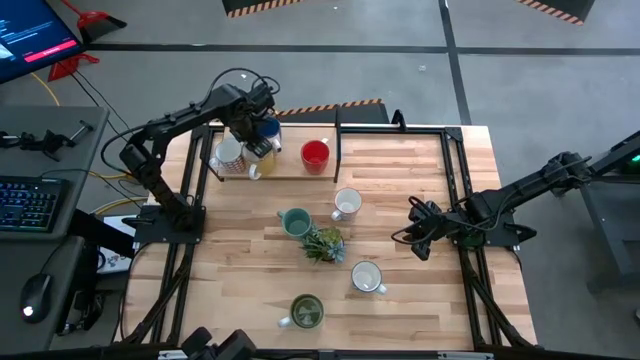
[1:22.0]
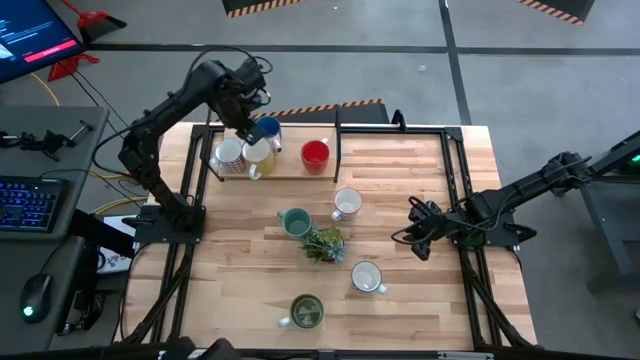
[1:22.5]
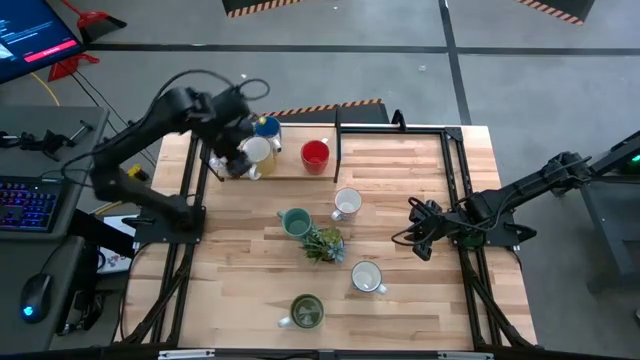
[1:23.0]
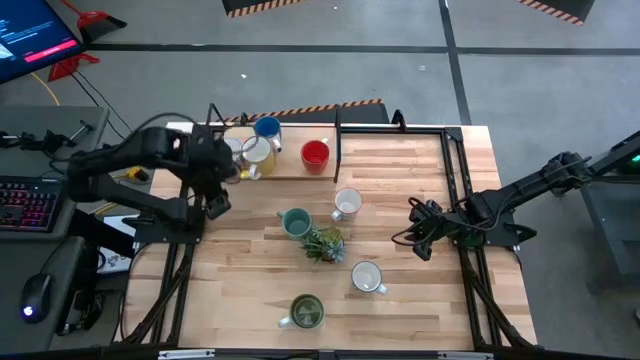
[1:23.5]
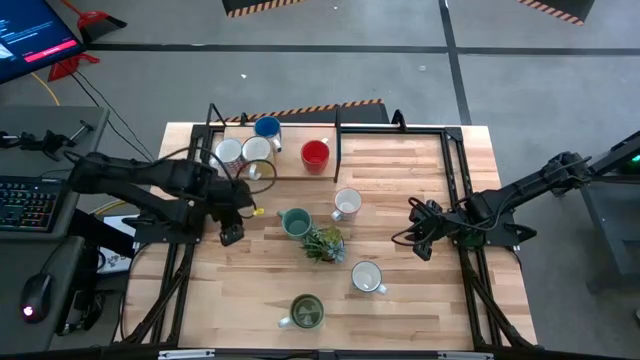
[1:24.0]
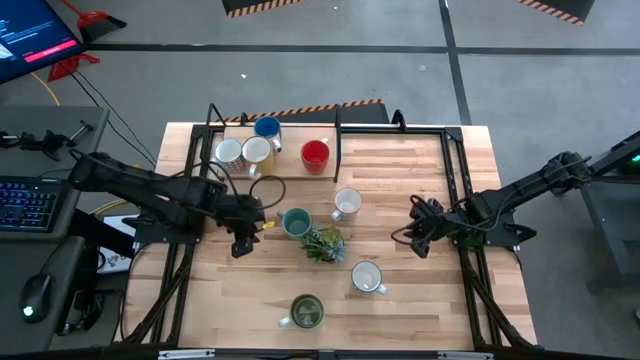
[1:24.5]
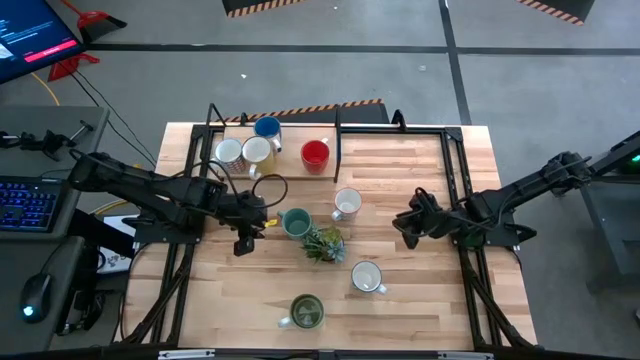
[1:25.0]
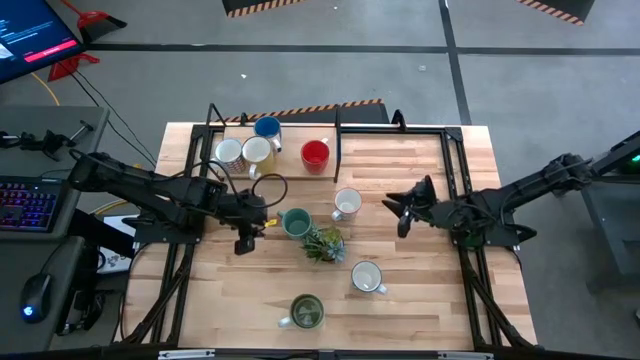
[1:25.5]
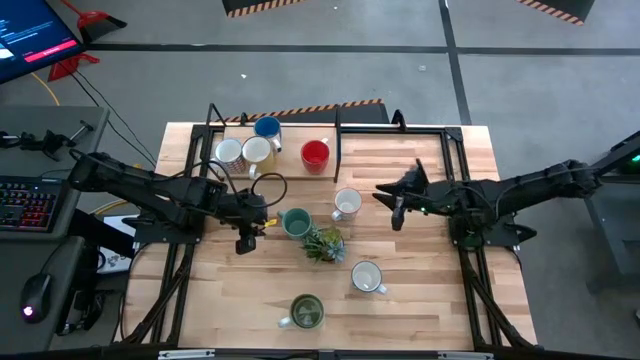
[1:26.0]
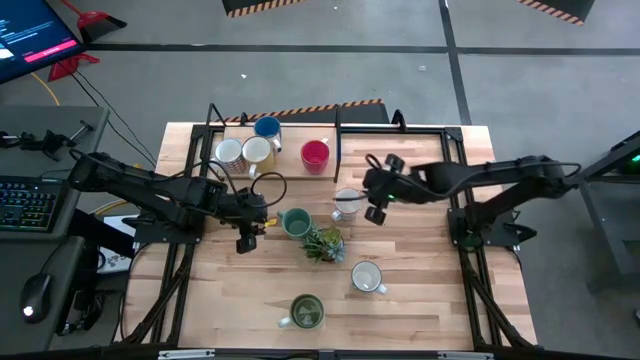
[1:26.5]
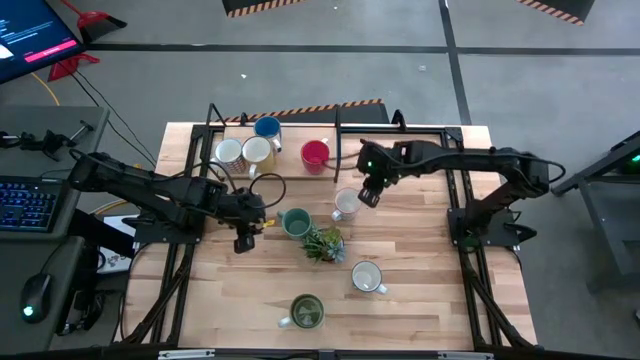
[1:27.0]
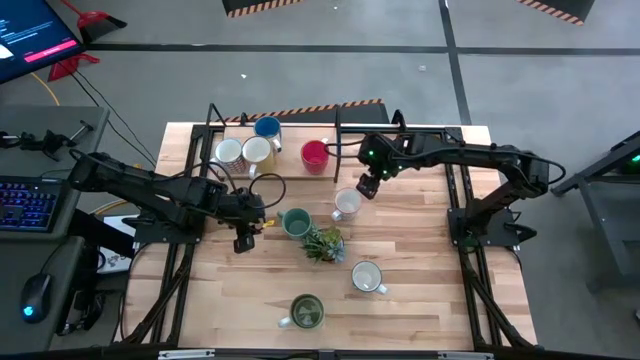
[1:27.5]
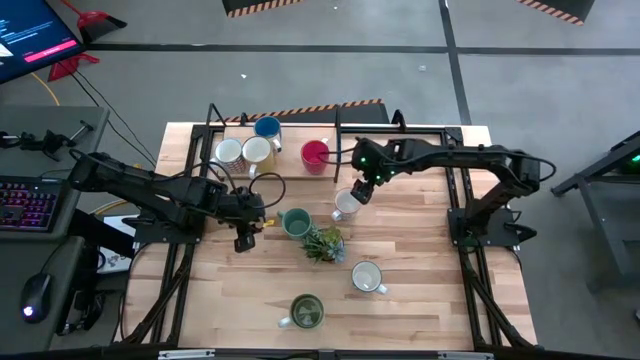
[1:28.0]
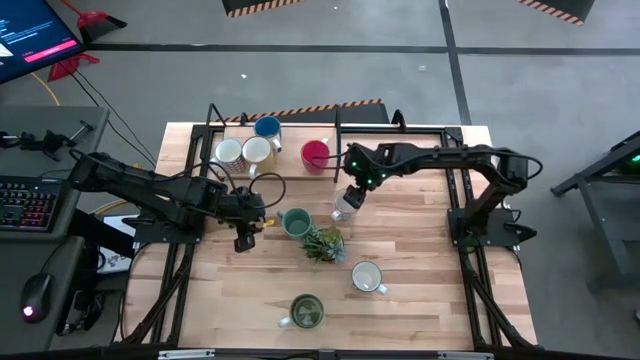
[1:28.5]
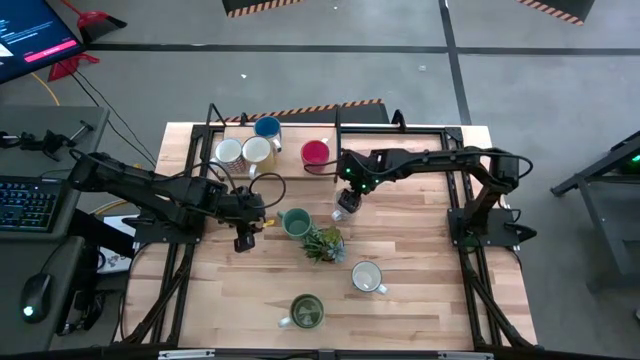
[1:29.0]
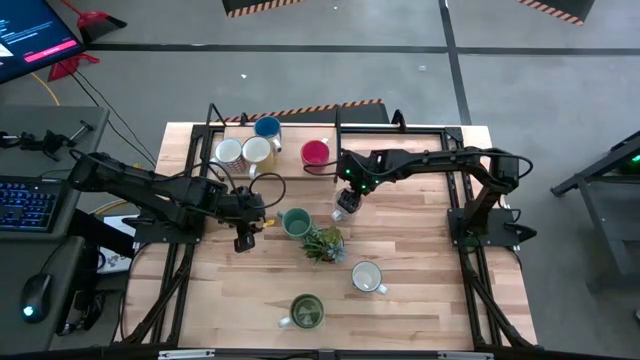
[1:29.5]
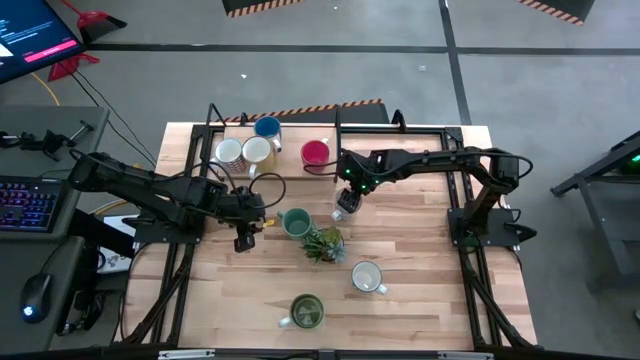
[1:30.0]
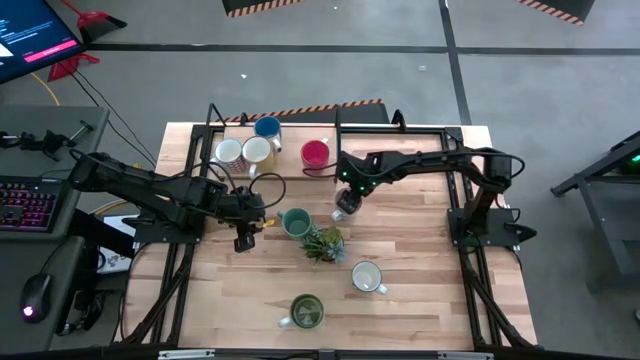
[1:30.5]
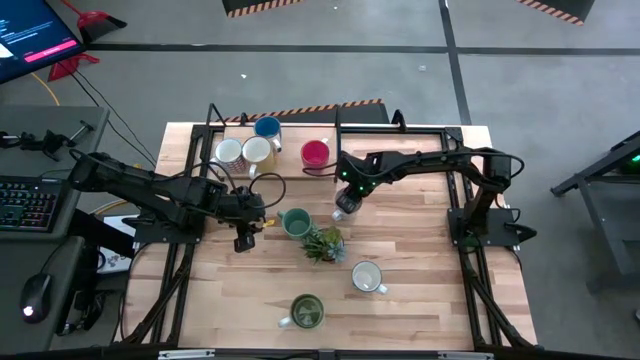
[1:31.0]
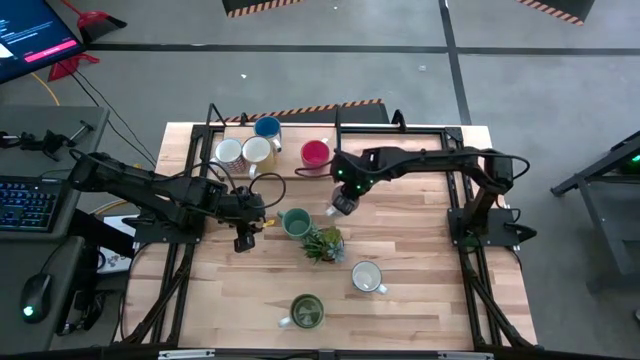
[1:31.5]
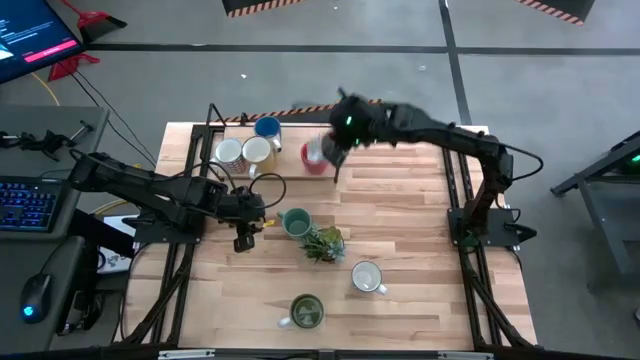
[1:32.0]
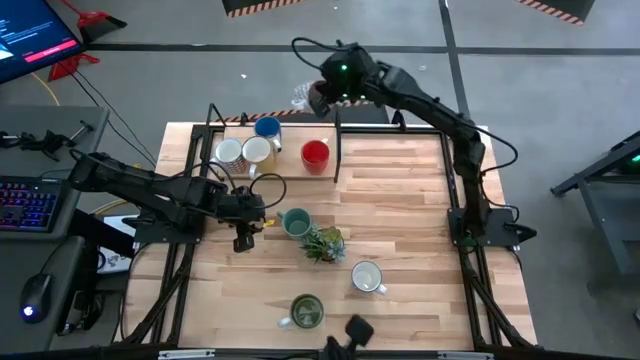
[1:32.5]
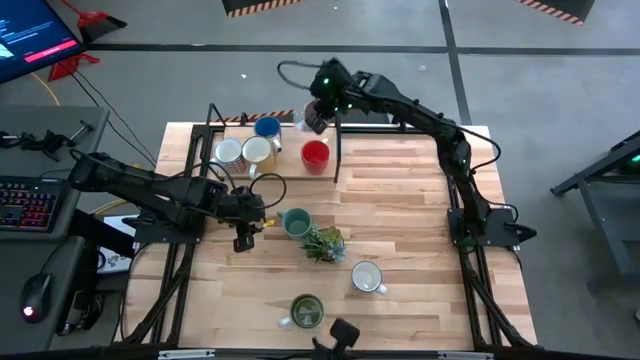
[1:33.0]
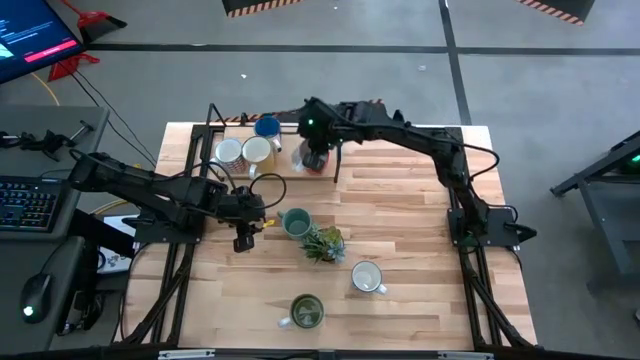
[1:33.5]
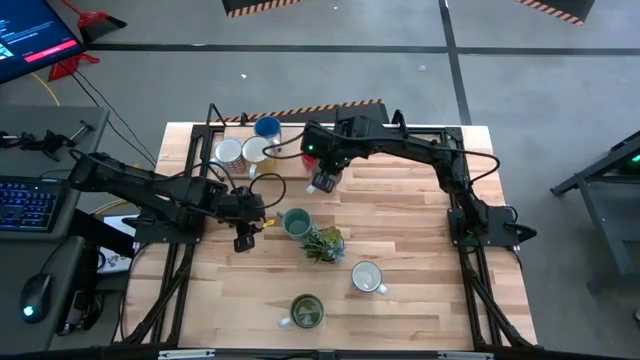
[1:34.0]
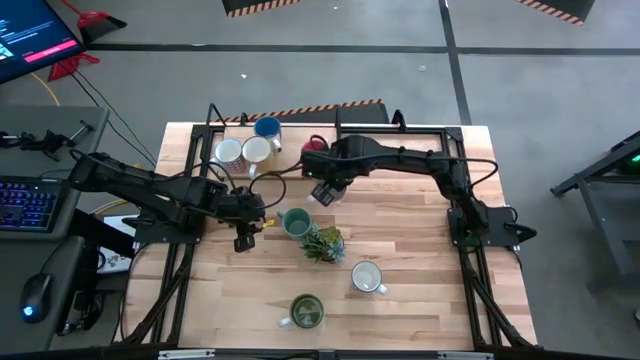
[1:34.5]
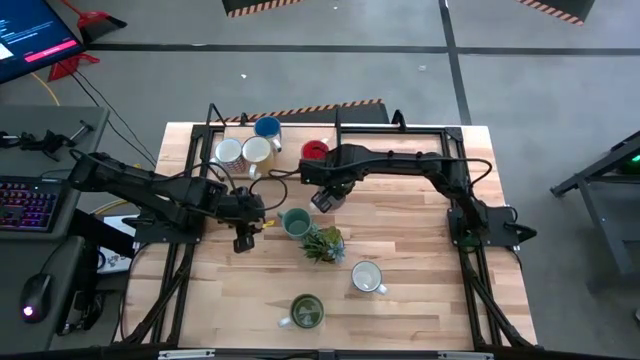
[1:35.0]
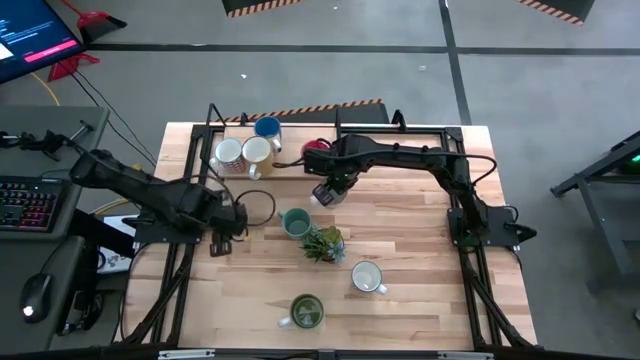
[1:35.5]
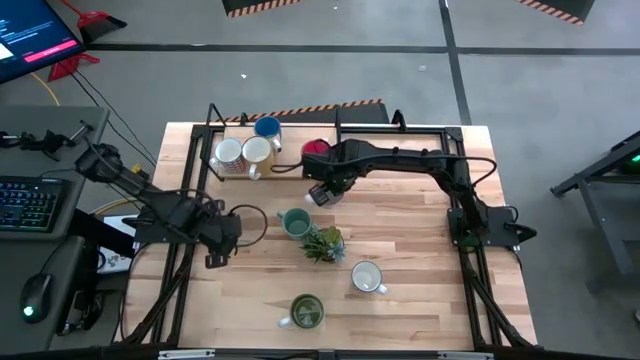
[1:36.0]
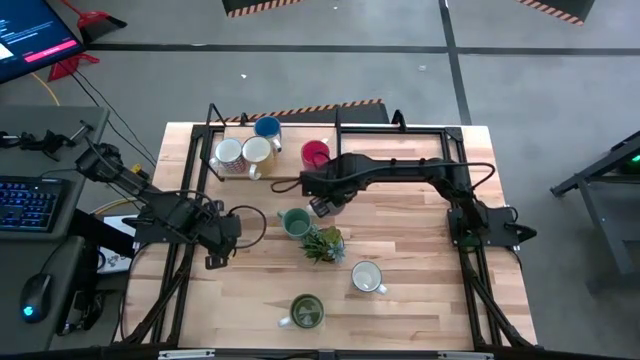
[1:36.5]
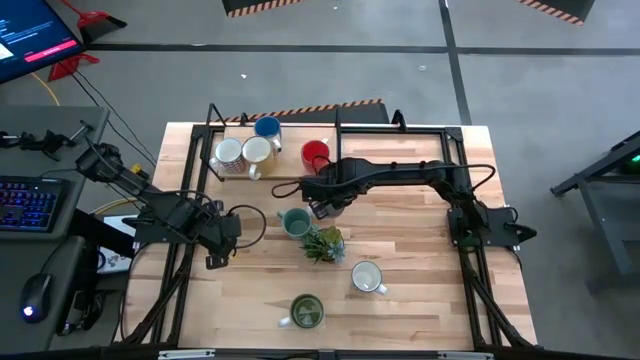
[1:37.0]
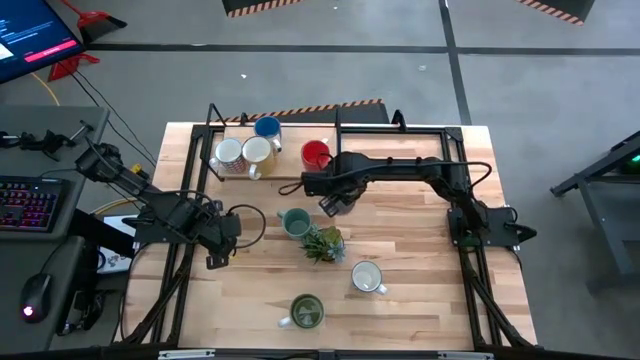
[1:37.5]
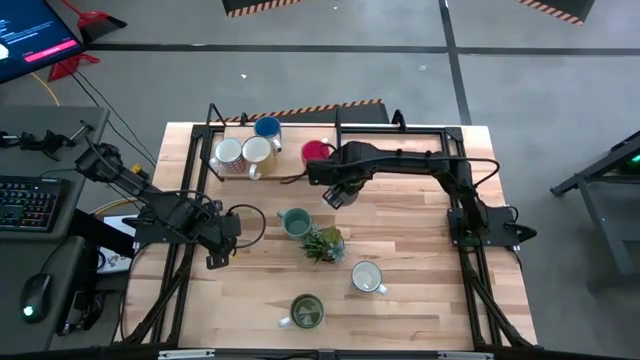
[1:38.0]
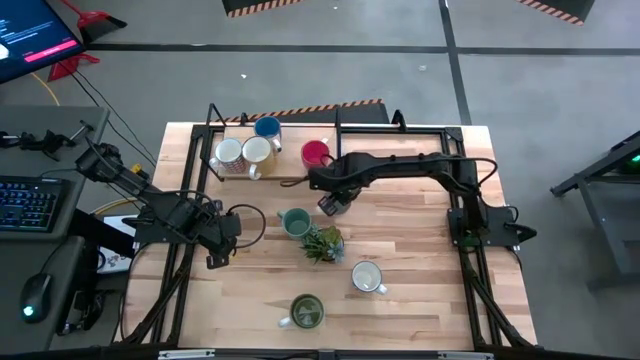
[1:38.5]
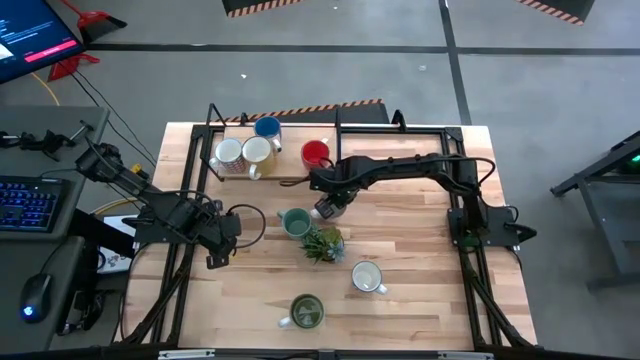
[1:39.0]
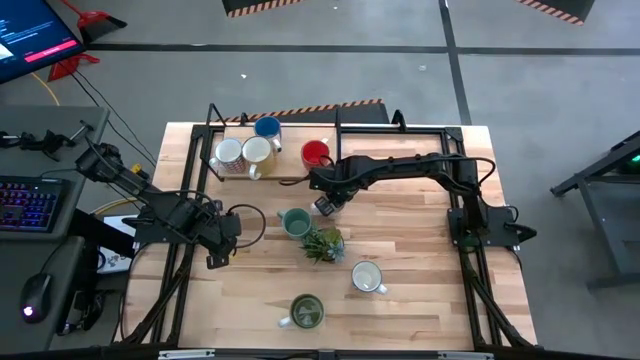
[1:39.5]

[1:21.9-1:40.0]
Task: Place coffee mugs
Put the gray patterned mug on the shelf

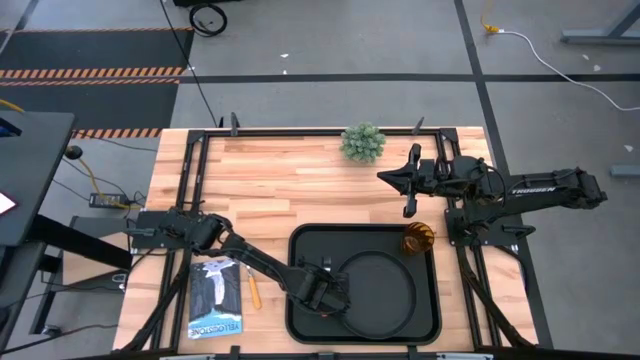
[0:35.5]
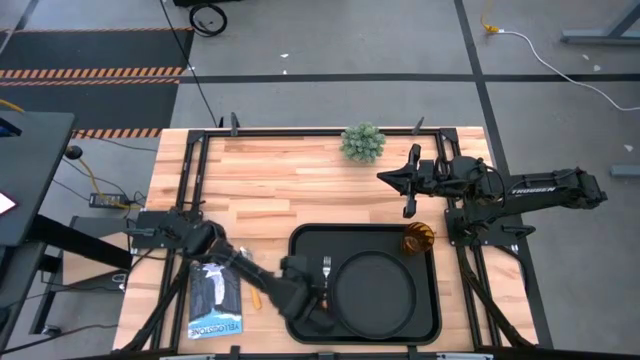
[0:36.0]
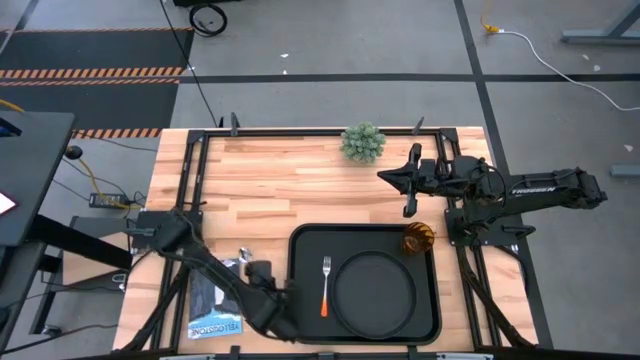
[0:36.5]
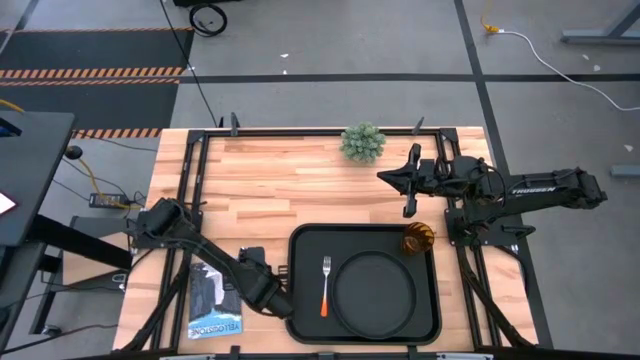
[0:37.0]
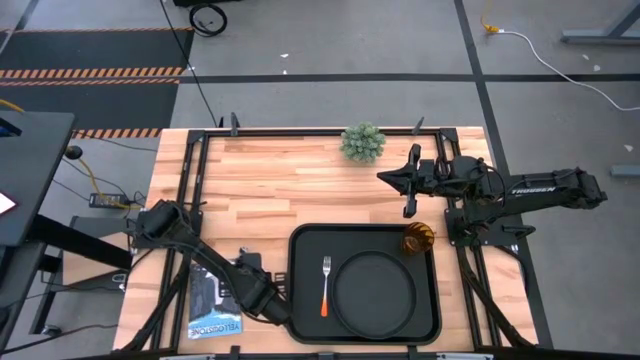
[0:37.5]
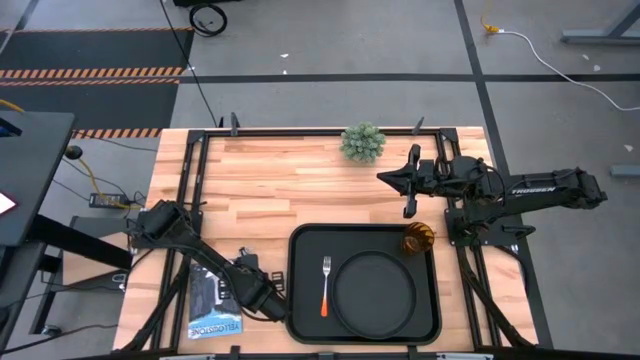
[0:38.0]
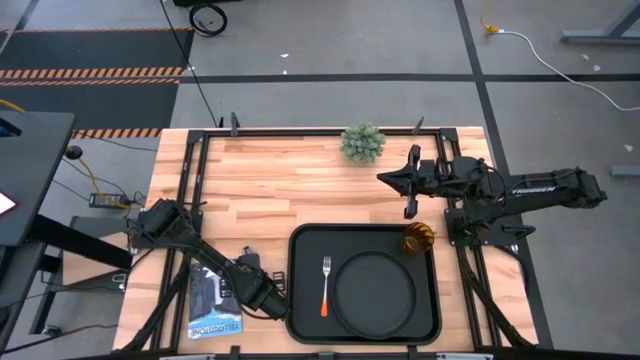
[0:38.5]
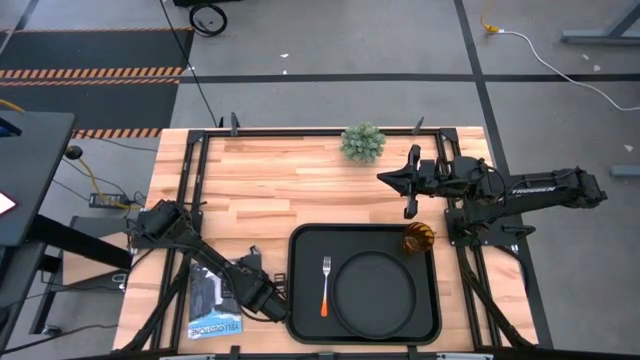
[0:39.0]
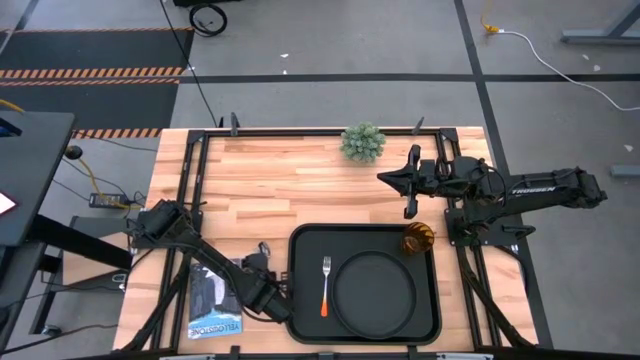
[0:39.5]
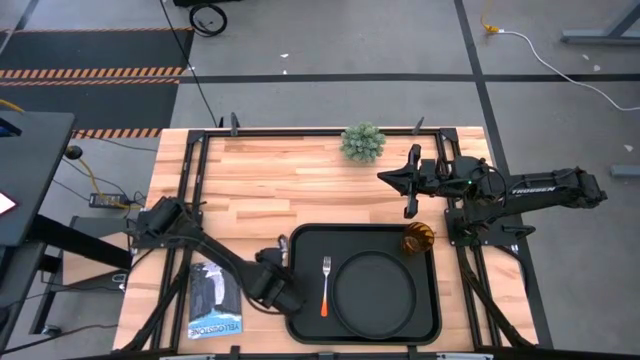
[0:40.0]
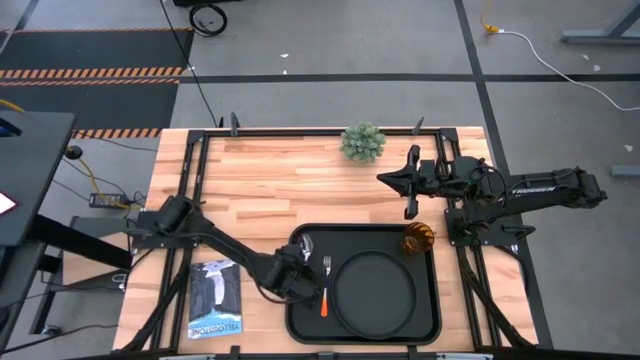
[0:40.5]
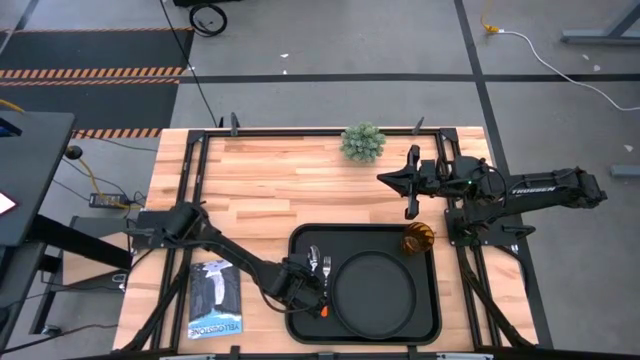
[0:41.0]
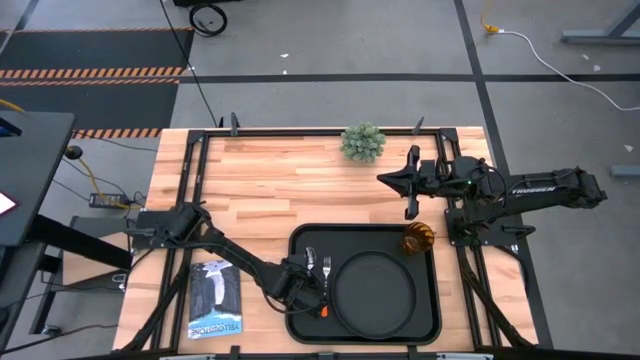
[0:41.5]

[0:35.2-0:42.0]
Task: Pick and place plate/cup/fork/spoon on tray
Put the yellow spoon on the black tray on the left of the orange fork
